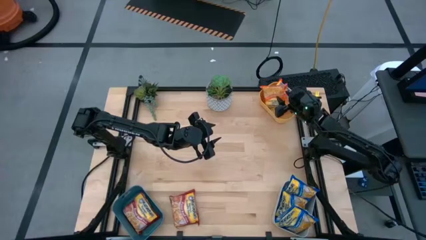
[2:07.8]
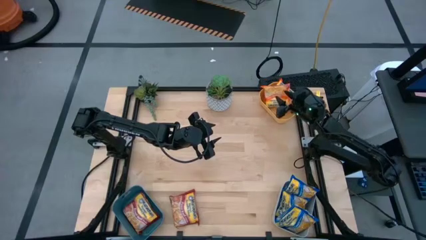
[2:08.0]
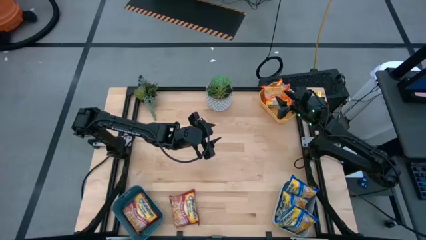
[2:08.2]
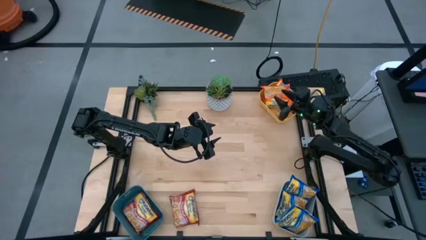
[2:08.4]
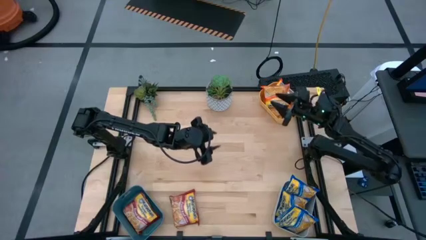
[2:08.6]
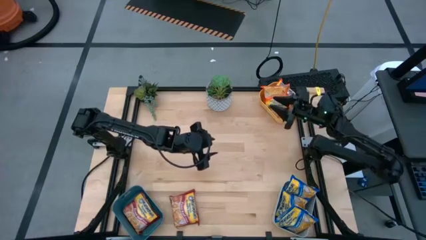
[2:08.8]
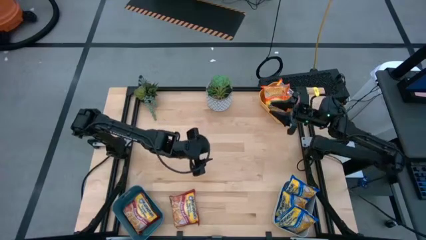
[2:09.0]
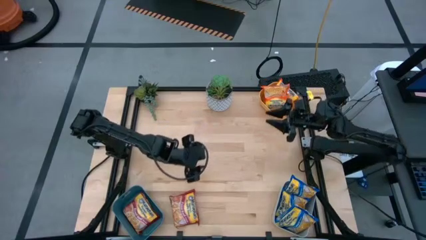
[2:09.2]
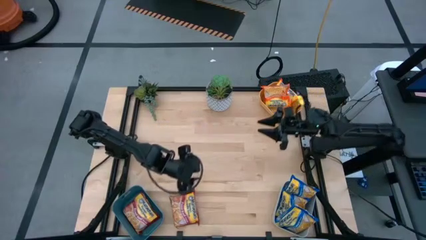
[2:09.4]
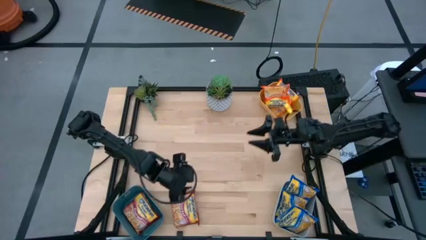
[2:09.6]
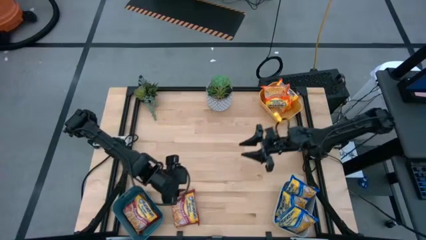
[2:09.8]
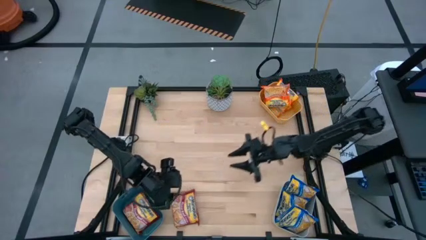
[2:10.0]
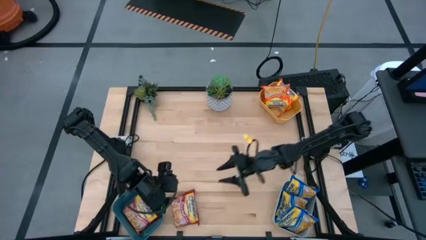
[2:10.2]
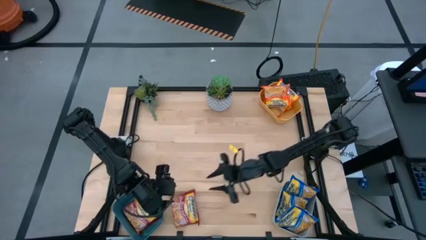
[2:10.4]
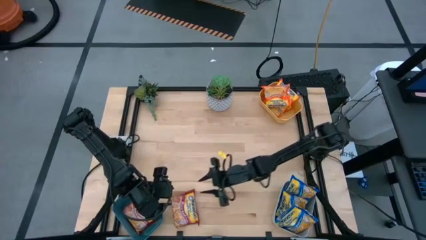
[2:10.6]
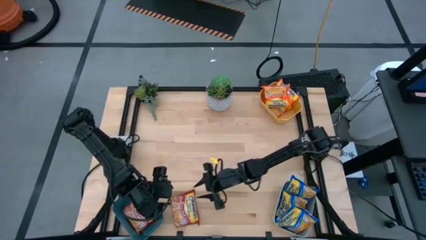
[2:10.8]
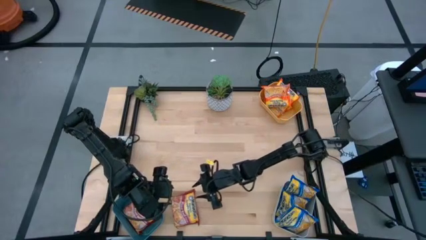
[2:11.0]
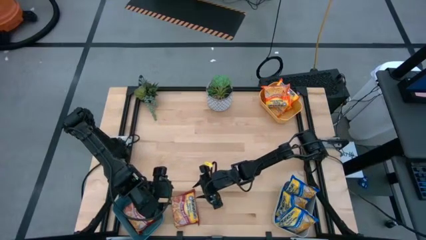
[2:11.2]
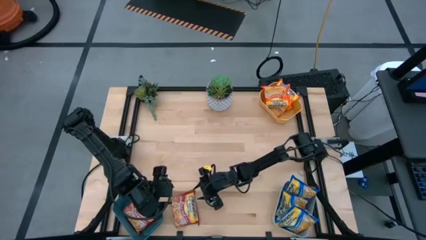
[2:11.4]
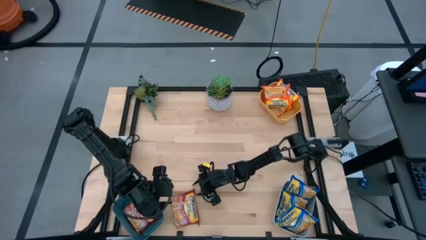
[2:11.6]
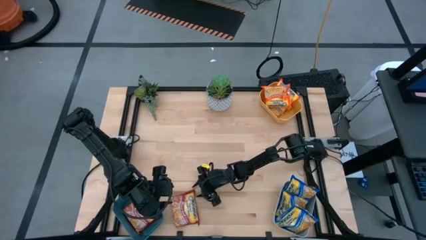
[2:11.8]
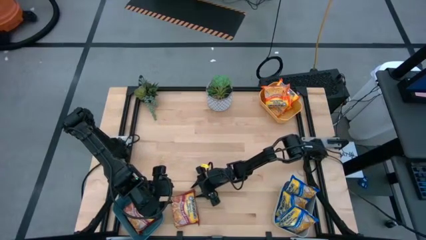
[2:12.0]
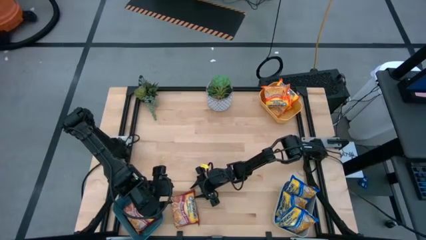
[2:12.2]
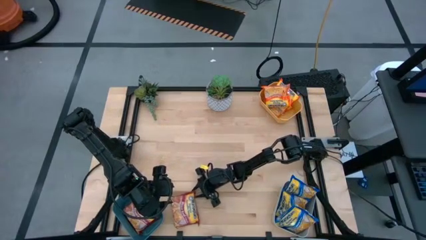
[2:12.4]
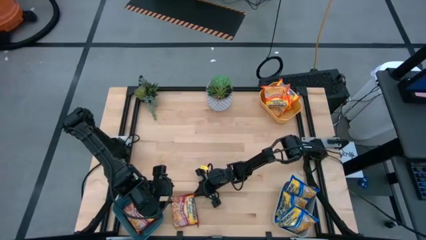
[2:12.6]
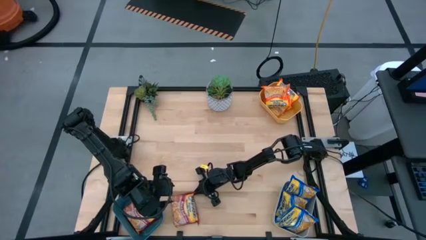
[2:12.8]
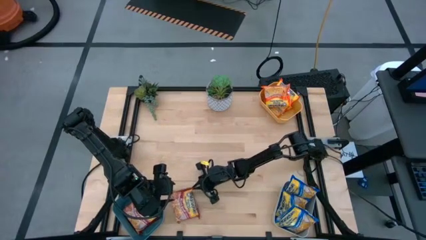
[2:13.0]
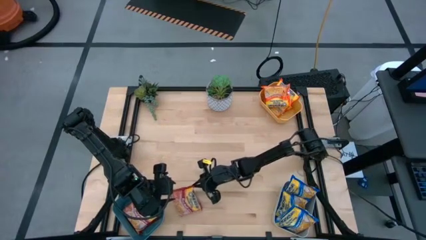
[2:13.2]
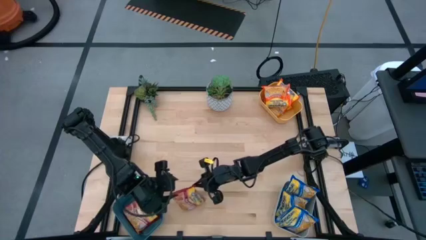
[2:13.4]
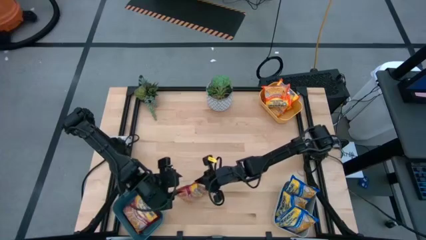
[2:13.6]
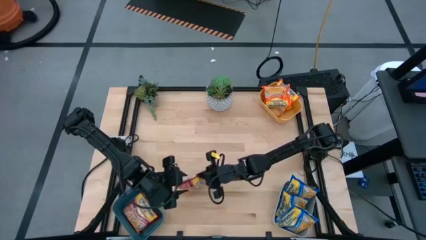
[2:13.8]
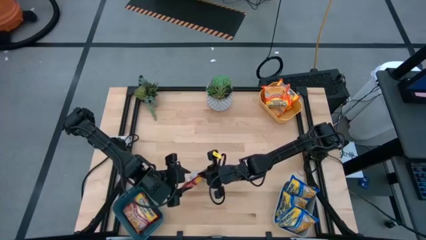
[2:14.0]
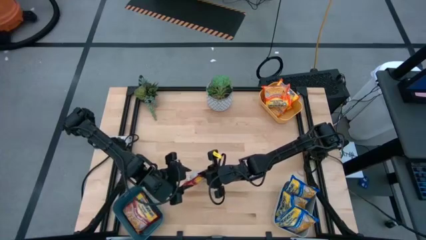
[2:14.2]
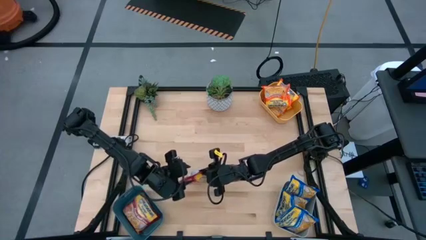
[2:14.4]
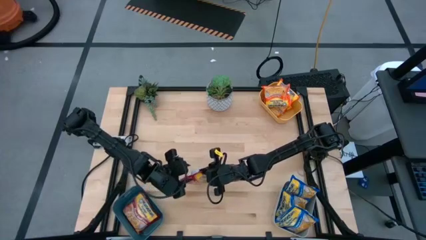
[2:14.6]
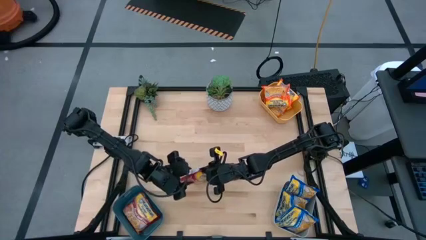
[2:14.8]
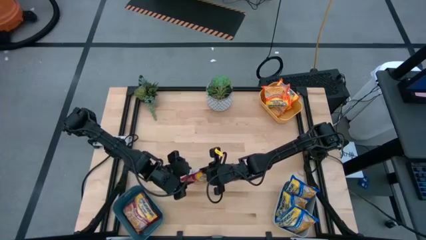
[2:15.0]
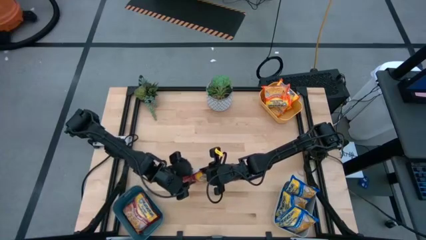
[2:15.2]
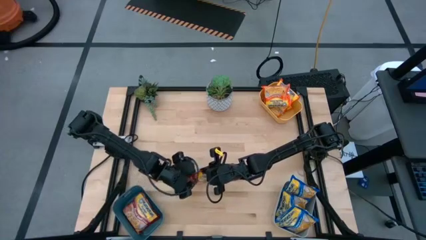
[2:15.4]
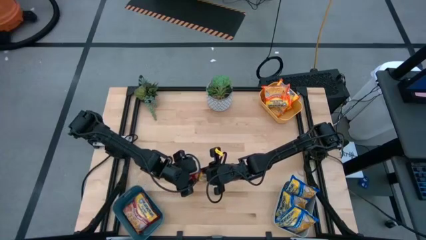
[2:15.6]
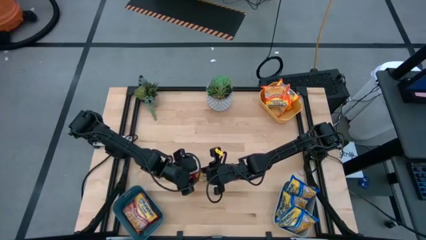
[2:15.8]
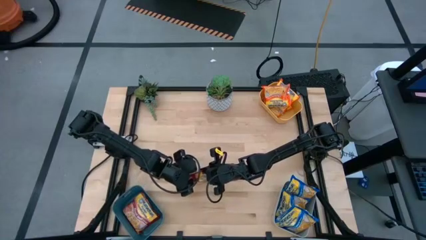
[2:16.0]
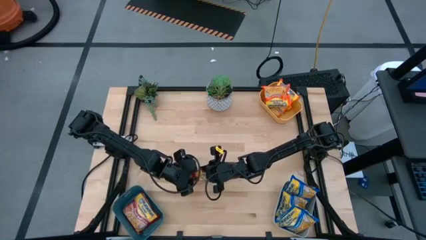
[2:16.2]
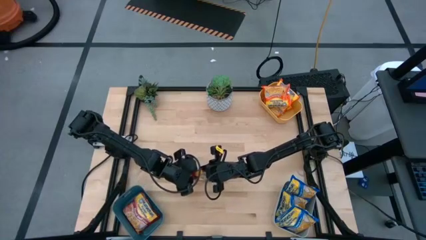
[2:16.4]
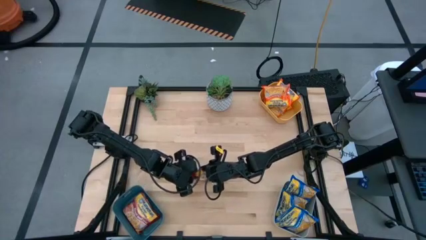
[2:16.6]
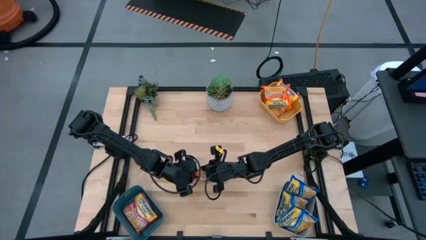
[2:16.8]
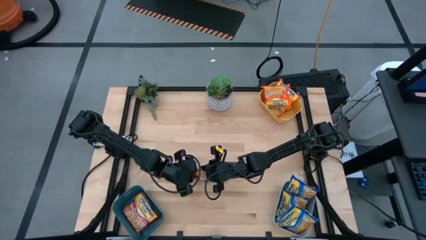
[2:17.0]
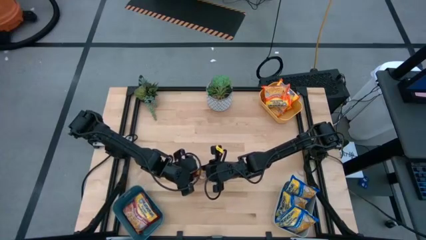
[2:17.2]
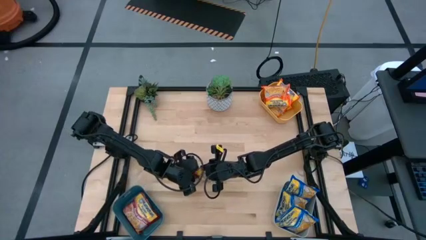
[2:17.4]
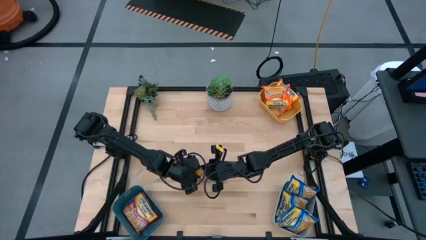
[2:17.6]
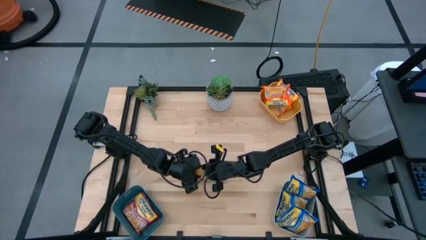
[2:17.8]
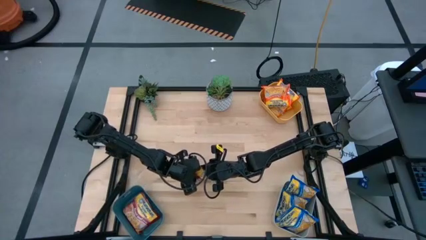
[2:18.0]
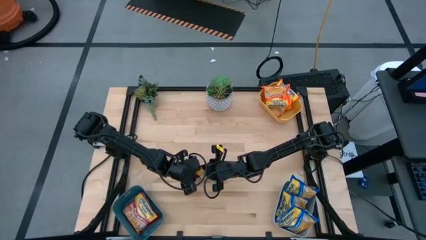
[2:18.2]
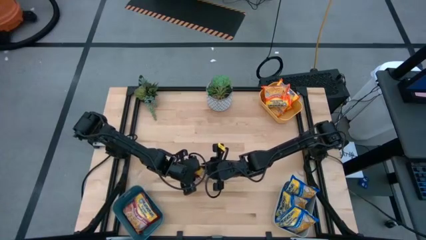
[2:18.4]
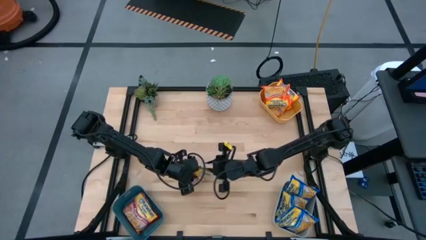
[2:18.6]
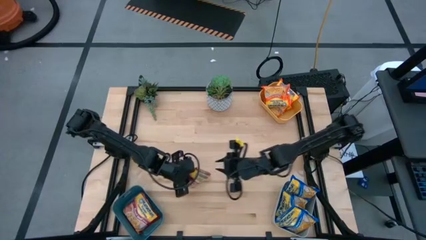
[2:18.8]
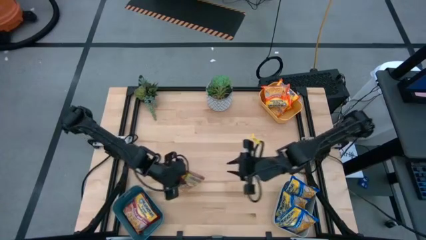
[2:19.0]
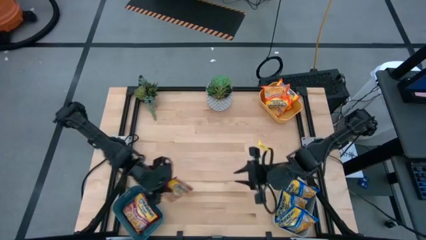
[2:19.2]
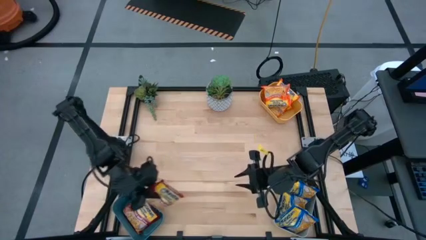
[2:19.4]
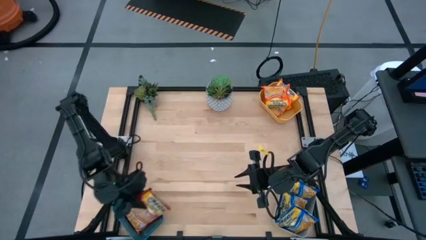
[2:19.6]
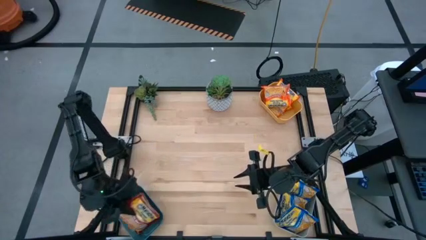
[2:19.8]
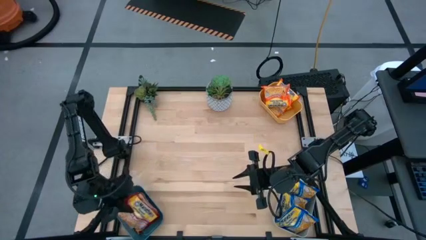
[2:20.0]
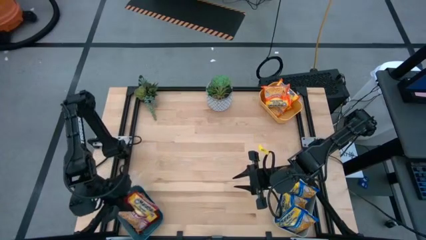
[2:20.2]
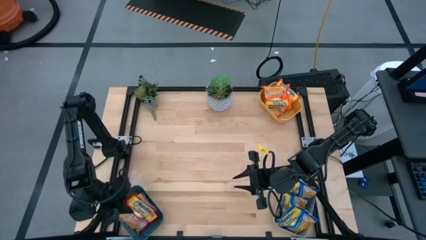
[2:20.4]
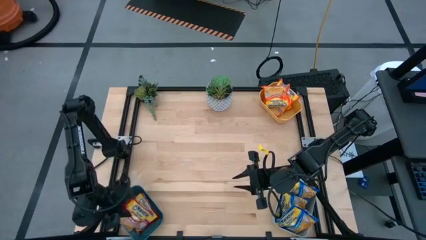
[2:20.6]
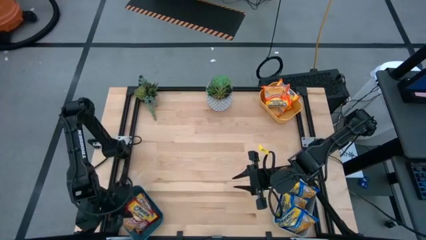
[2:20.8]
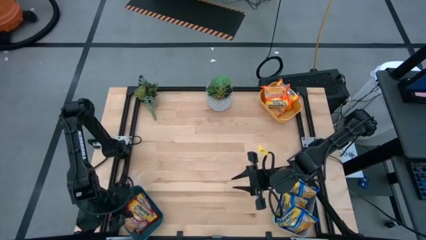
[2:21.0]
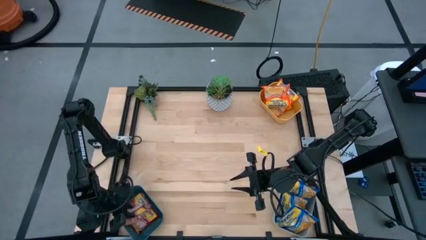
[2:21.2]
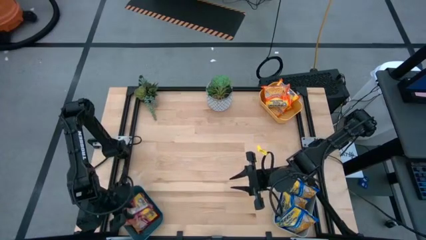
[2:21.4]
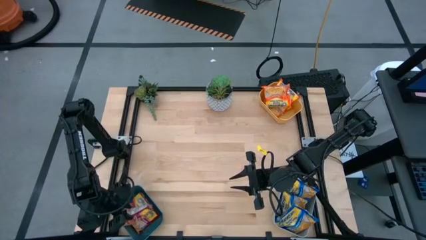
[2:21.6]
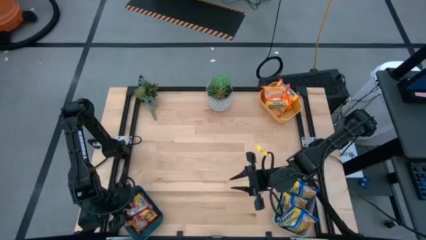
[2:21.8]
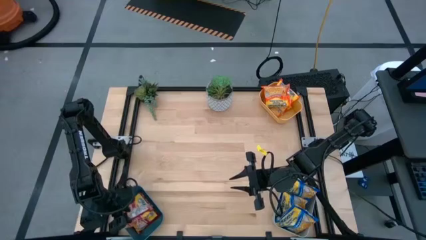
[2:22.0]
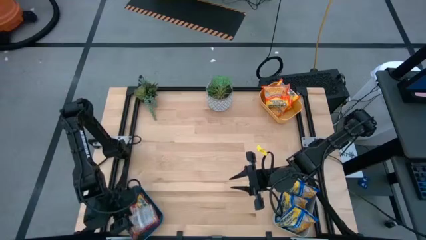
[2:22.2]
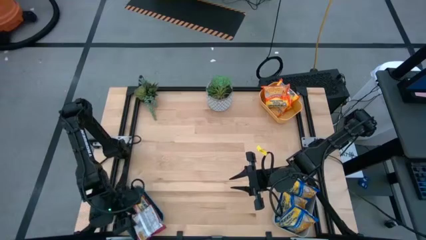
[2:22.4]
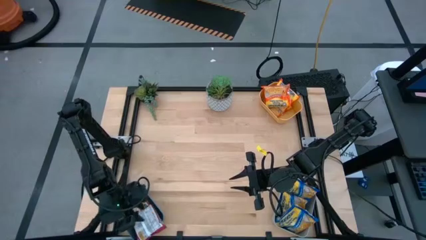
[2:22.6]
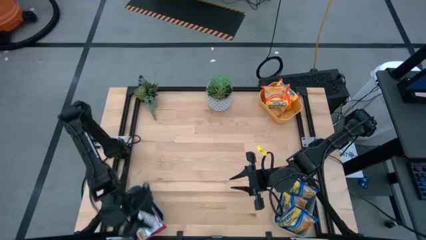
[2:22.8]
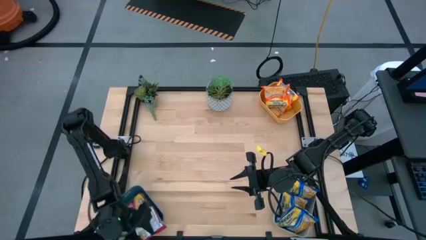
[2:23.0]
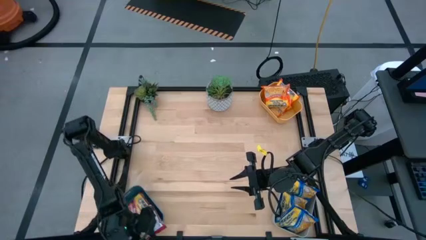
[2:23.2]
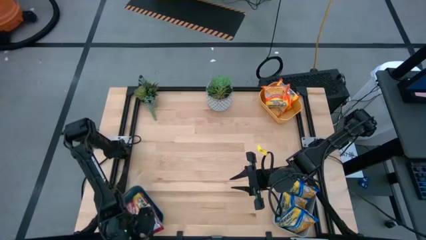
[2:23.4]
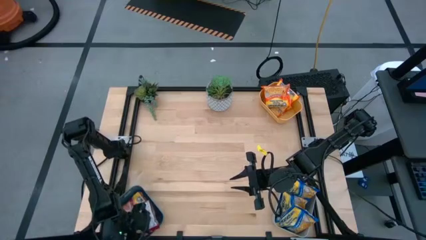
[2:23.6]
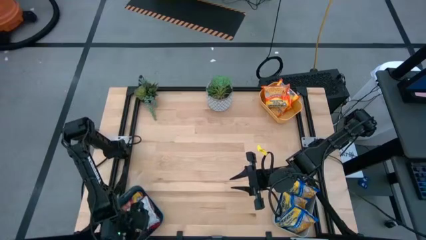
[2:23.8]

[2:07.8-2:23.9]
Task: Sort Maruchan noodles
Put the red noodle pack into the blue bin

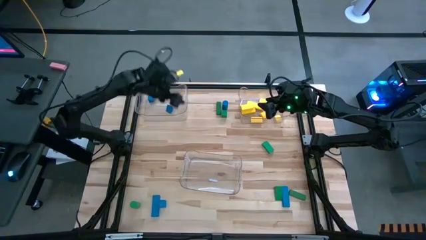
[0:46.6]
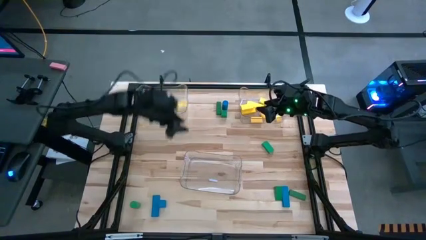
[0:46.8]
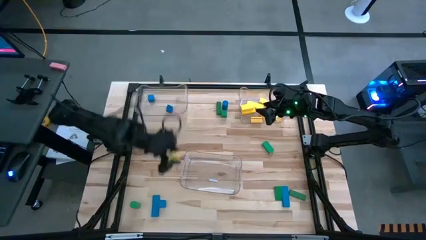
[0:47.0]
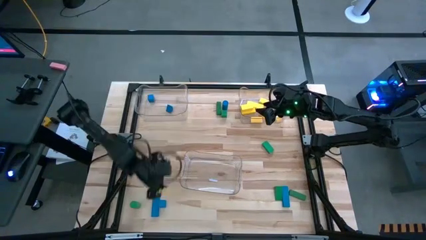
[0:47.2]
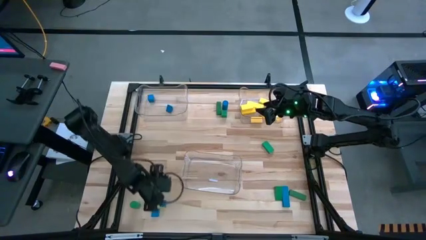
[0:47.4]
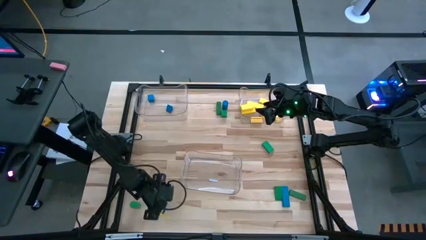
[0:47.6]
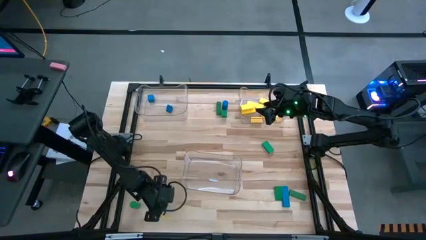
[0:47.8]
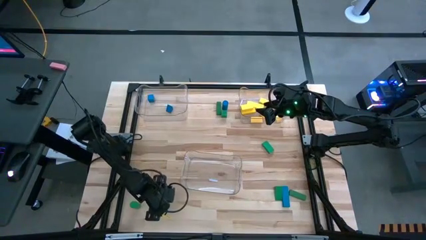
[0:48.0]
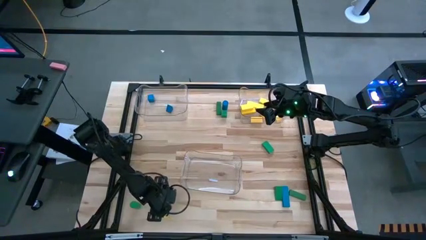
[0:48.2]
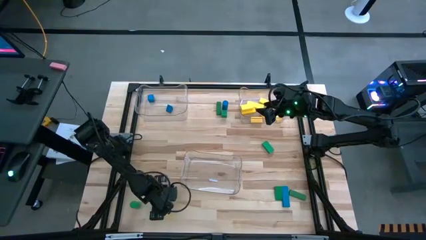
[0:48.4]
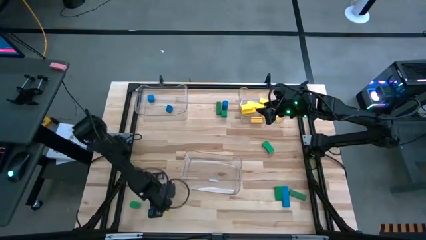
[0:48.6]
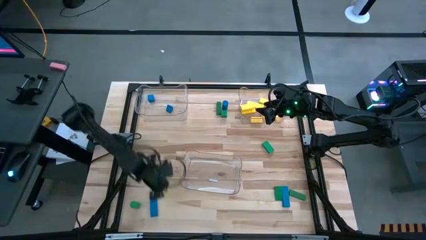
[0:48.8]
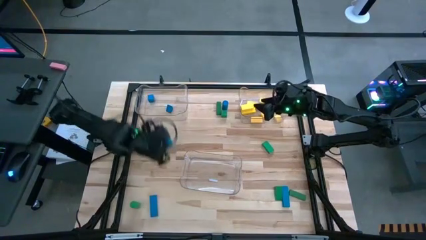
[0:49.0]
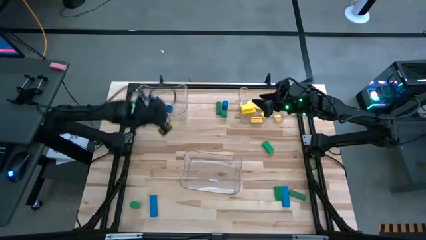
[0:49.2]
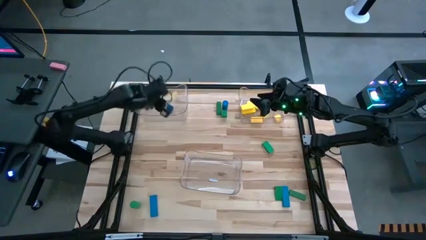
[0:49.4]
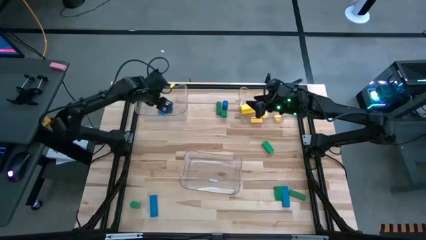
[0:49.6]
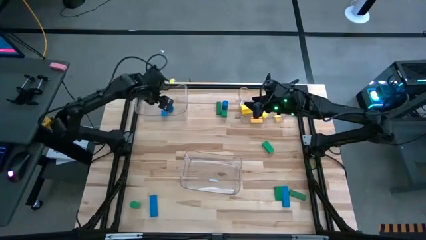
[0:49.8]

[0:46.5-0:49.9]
Task: Sort blocks
Put the blue block into the left transparent bin
